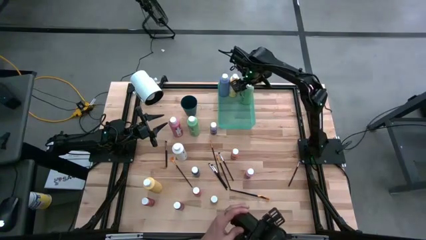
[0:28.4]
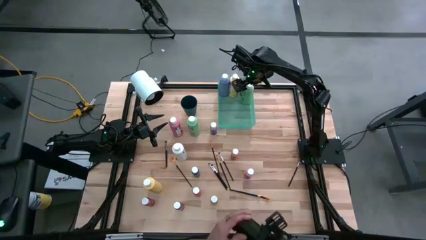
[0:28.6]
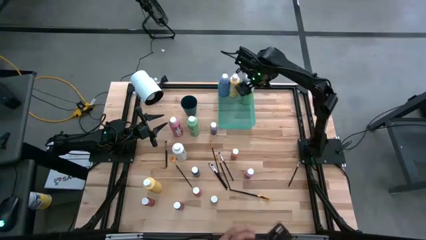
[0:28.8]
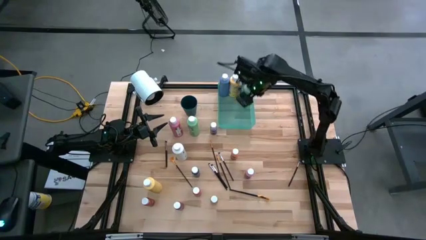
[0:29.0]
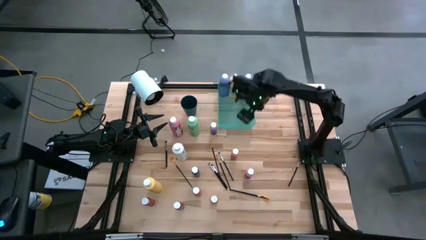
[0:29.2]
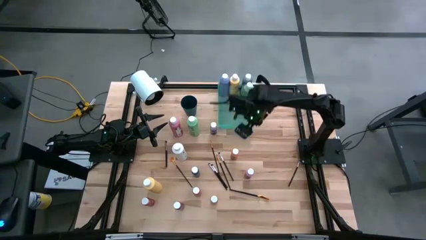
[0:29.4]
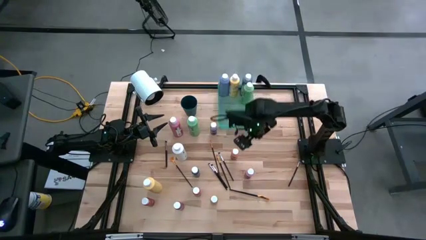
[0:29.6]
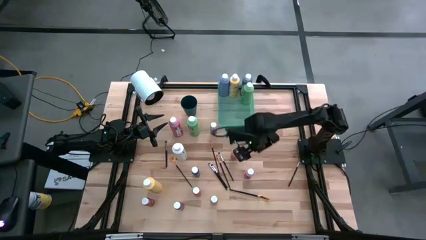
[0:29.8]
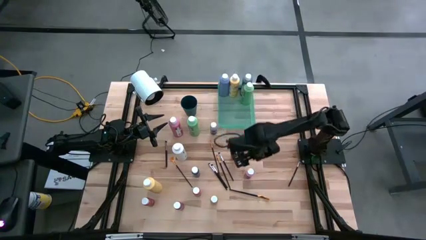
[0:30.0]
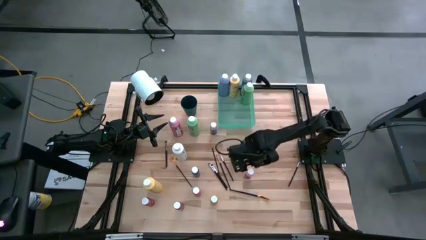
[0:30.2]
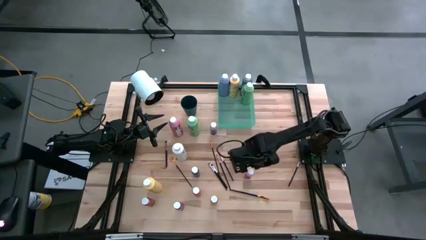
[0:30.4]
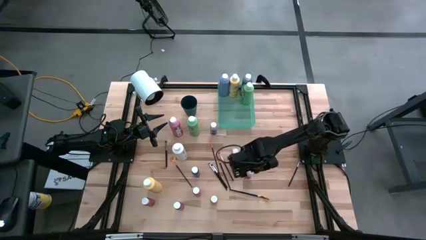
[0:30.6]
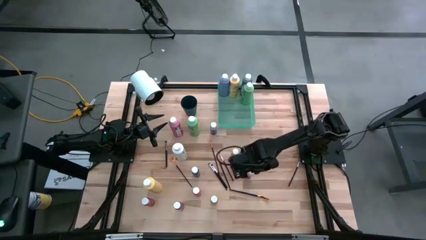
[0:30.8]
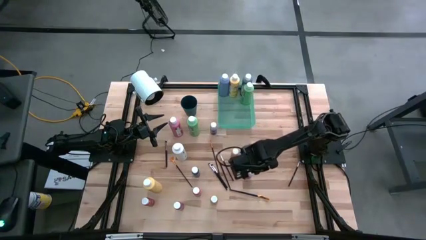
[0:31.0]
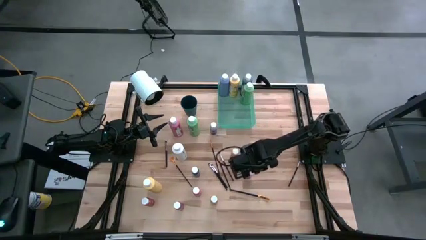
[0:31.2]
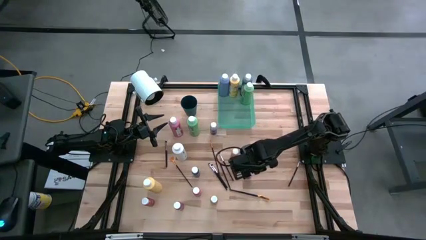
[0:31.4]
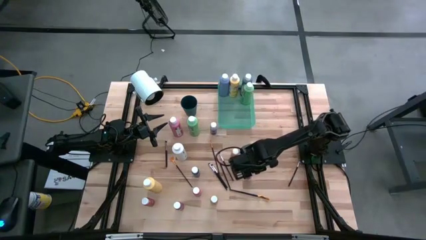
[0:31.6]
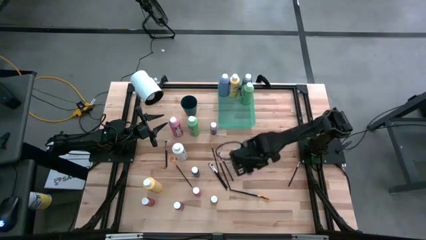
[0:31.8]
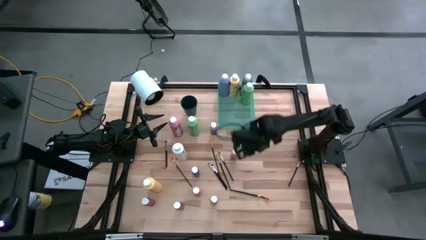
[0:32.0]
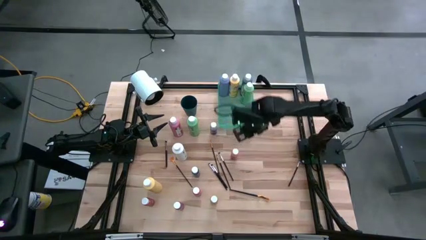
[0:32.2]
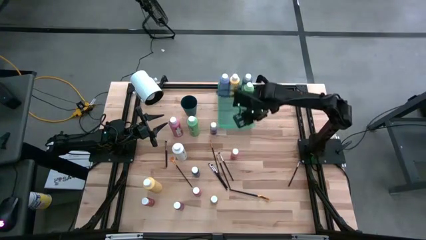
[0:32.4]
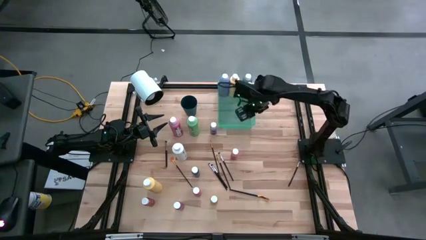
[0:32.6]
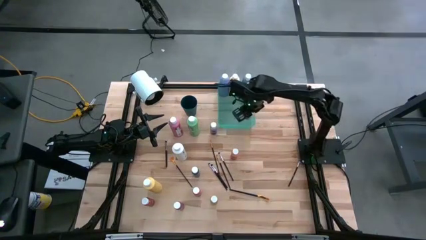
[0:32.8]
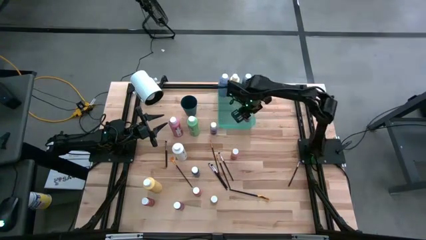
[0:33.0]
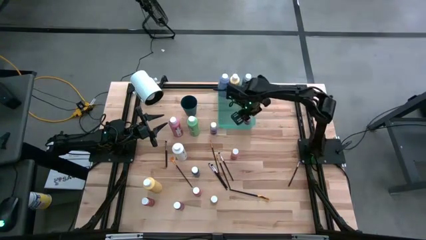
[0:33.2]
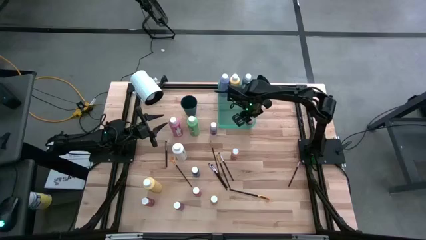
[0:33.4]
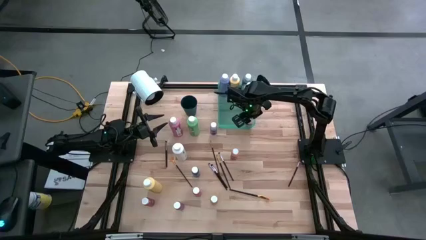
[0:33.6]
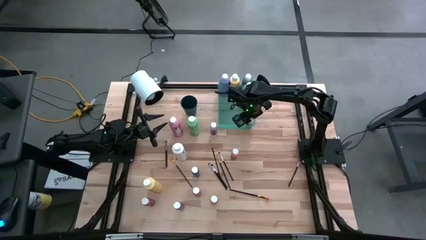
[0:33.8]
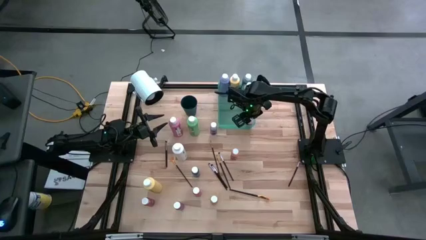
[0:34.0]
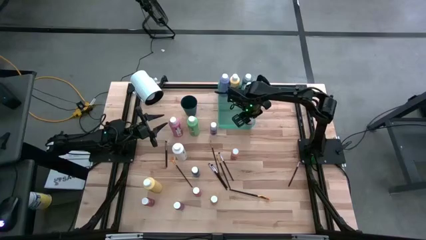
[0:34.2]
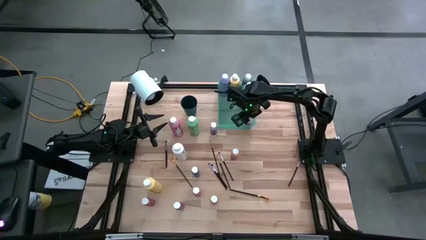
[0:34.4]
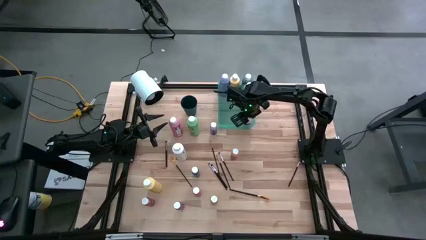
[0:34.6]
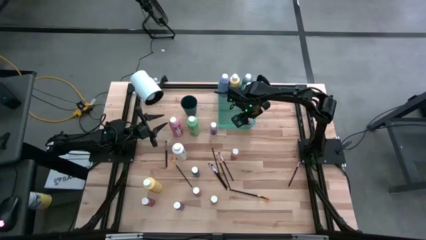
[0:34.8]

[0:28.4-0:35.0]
Task: Pick & Place Paint Supplies
Put the pink small paint bottle into the green bin

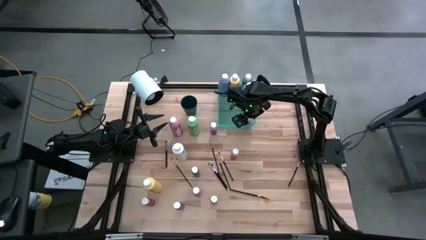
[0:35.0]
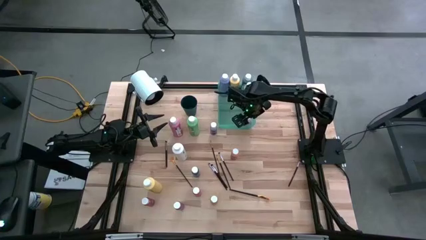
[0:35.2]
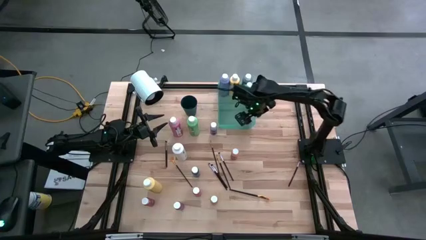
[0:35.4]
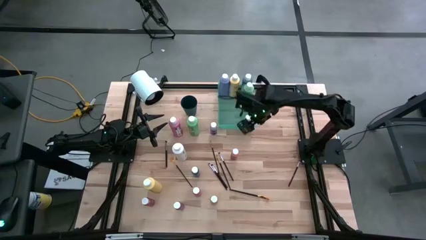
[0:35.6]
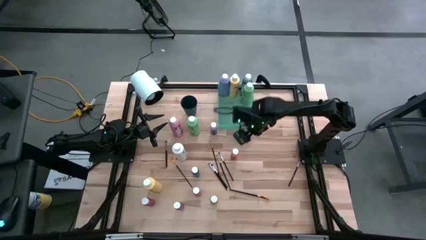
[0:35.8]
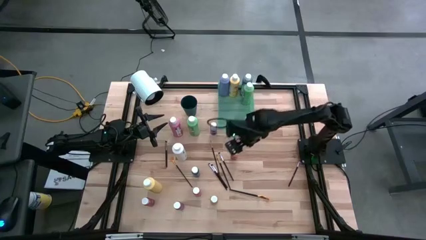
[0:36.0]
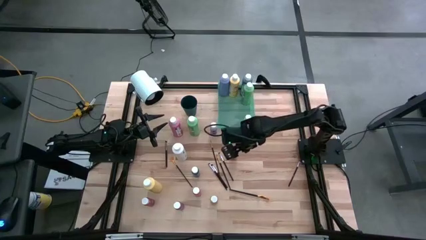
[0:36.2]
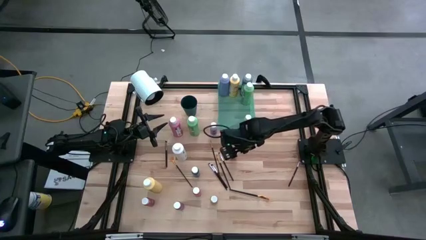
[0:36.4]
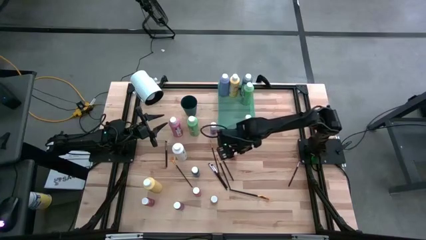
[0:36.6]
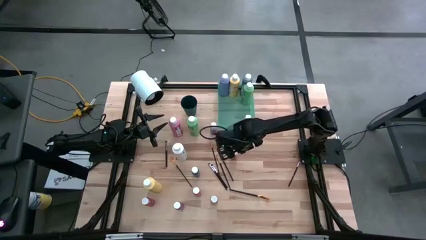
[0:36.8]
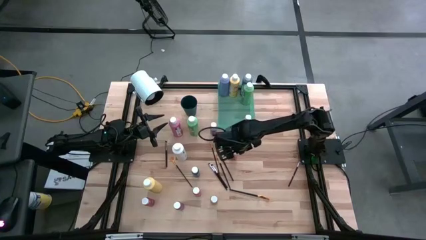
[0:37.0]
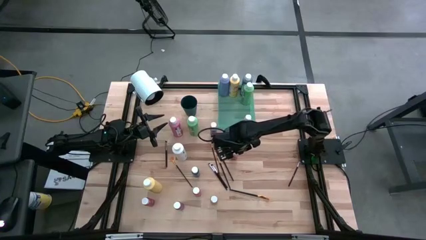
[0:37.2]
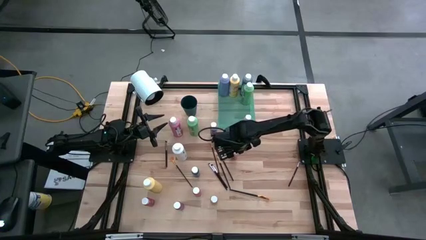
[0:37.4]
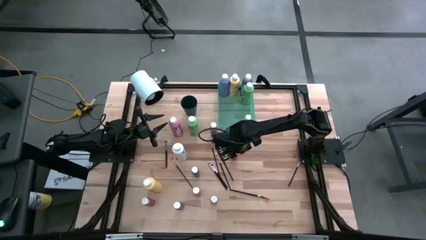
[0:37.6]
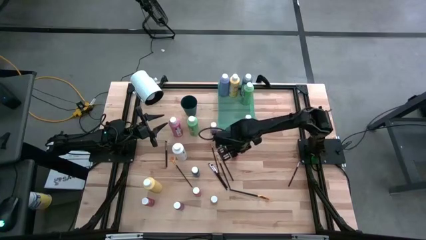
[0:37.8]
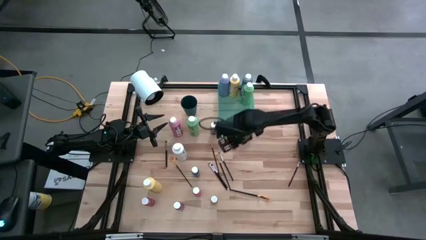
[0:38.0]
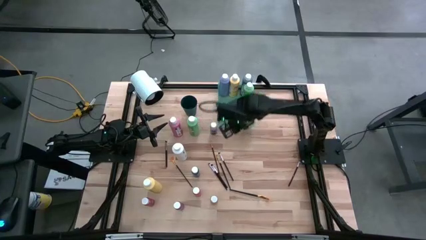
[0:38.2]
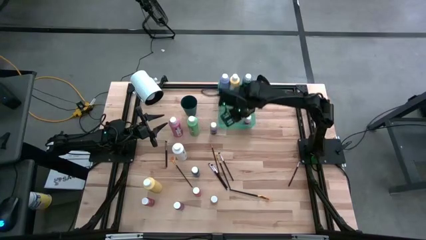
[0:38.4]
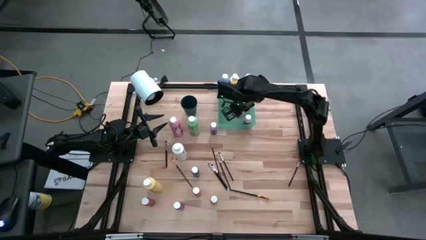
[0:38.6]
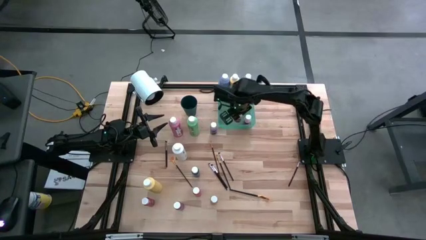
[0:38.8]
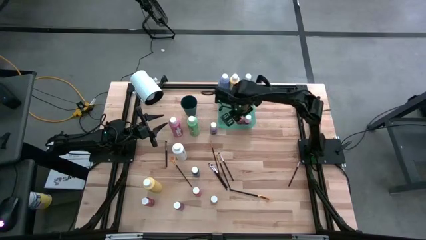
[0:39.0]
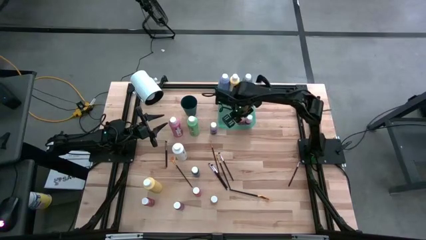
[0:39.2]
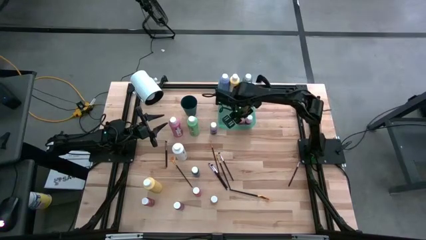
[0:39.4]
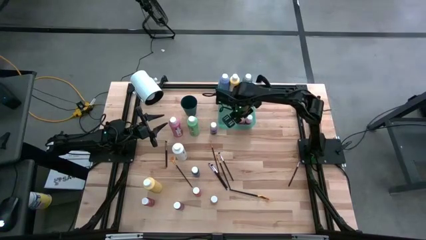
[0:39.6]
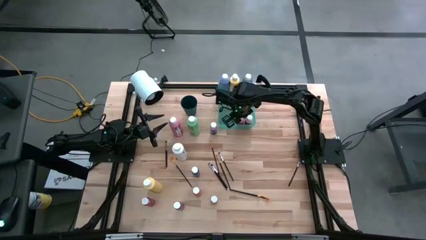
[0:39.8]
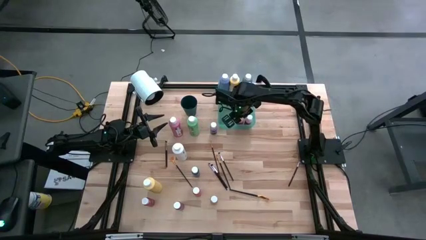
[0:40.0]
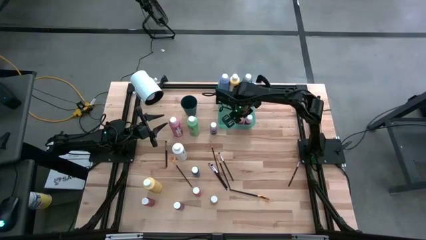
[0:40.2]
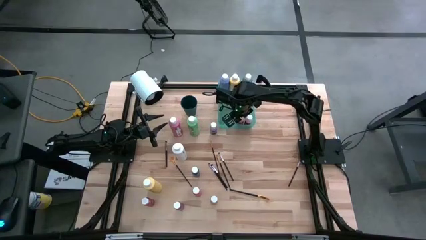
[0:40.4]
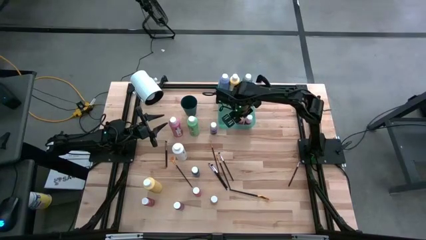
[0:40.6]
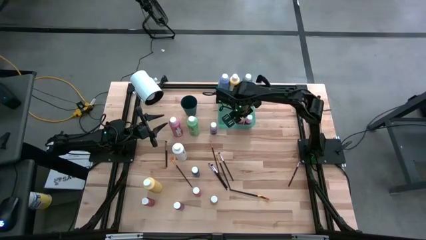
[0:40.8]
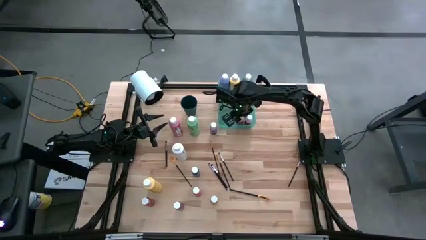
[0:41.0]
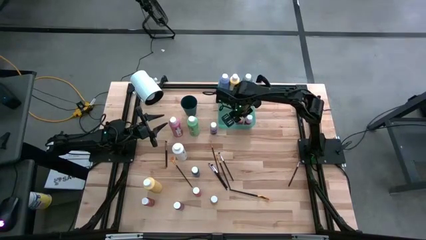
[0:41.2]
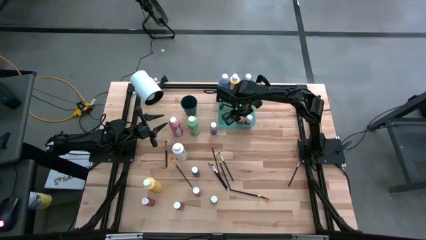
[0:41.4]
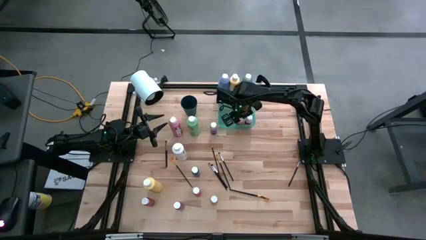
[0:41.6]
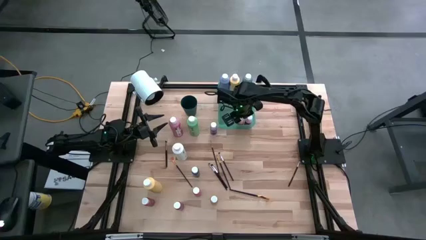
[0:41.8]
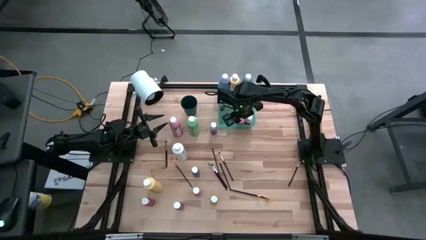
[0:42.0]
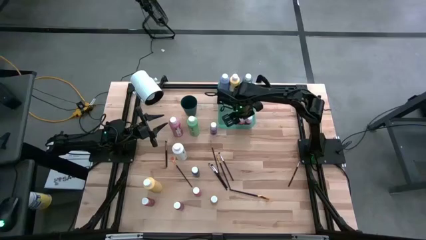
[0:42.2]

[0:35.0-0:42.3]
Put the orange small paint bottle into the green bin

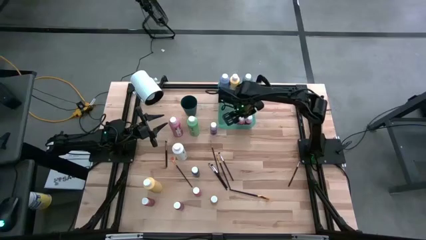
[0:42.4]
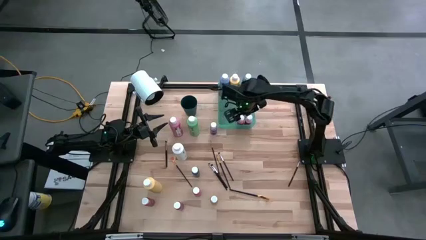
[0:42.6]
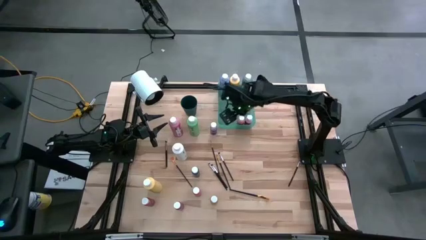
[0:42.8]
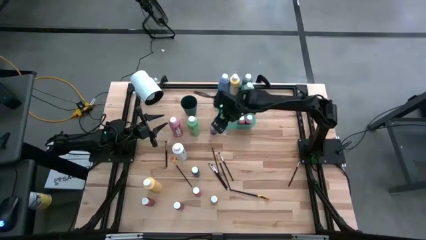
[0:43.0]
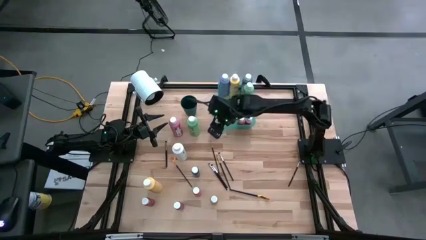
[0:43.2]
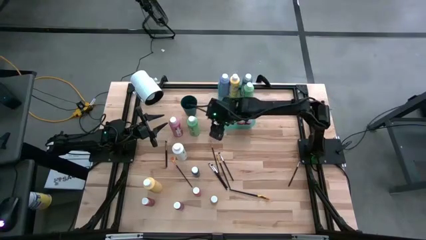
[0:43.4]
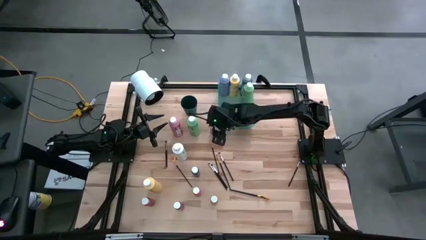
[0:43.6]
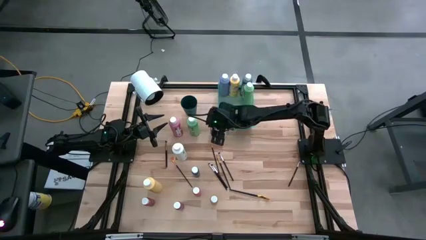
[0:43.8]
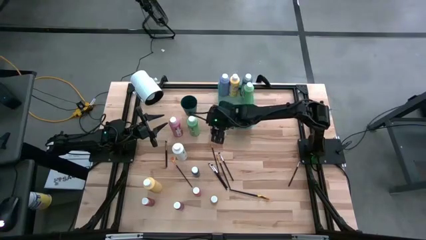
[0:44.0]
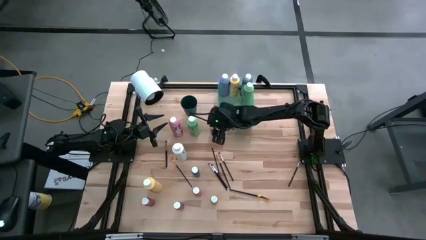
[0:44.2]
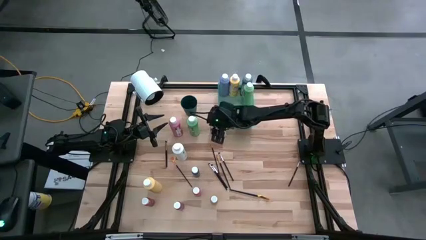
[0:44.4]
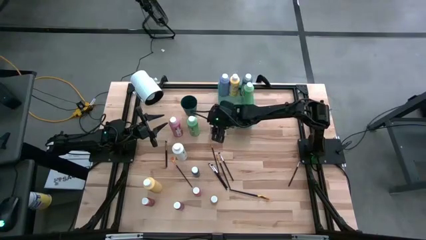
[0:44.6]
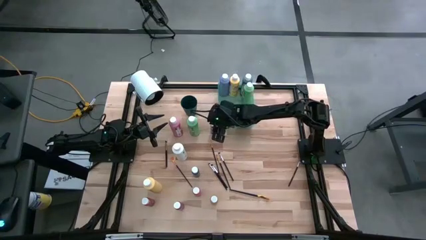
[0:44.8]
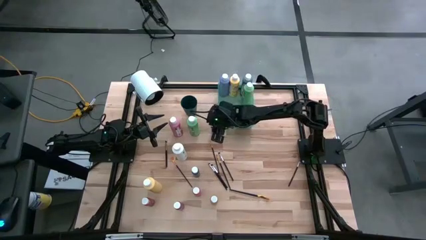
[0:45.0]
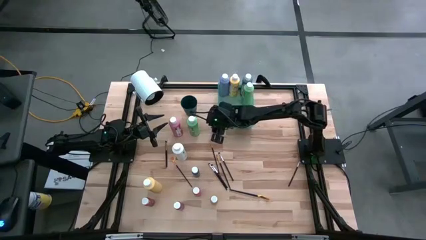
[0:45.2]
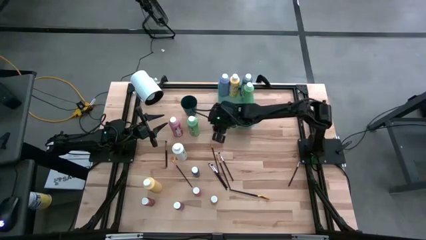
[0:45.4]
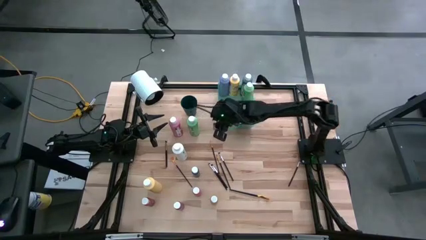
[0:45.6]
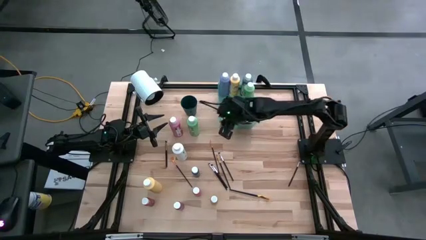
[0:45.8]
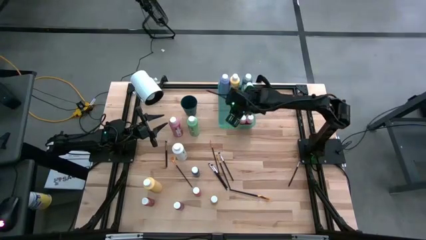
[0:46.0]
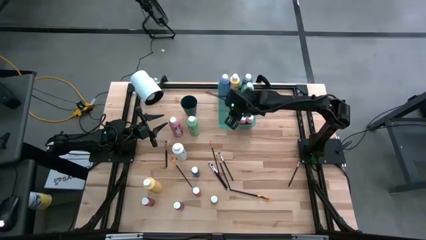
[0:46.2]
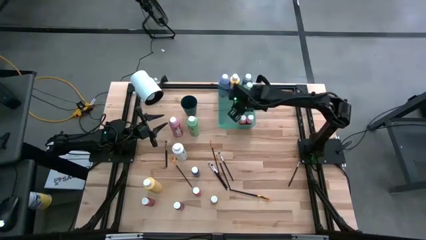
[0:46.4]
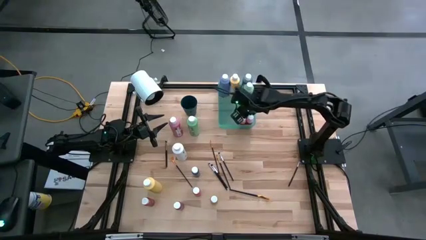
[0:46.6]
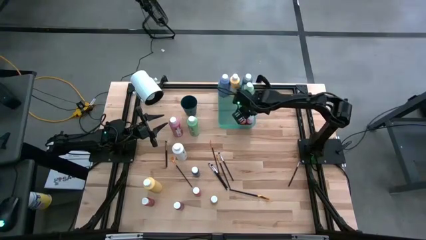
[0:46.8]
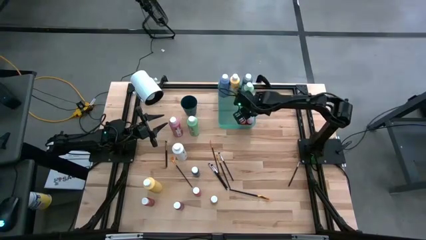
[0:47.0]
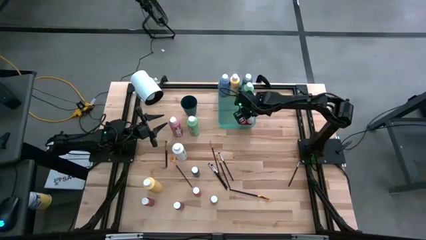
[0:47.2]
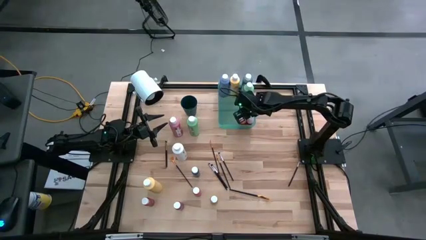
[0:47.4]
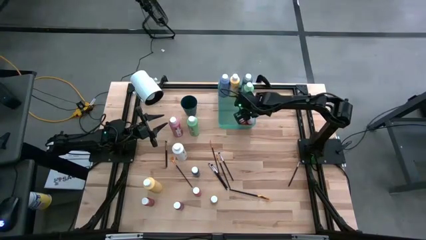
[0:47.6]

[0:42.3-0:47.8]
Put the purple small paint bottle into the green bin
